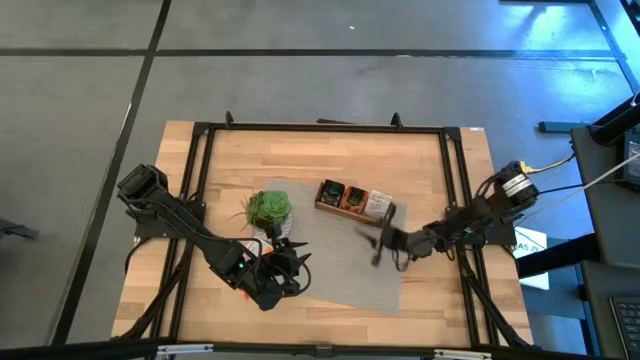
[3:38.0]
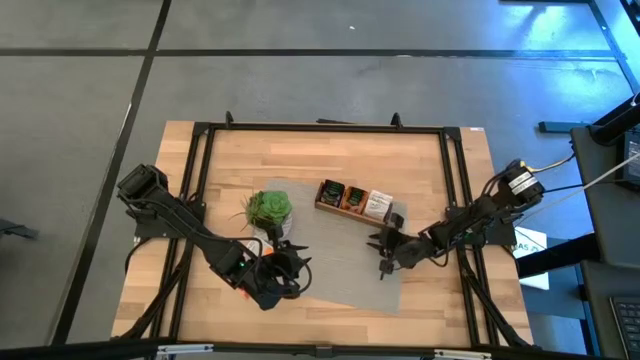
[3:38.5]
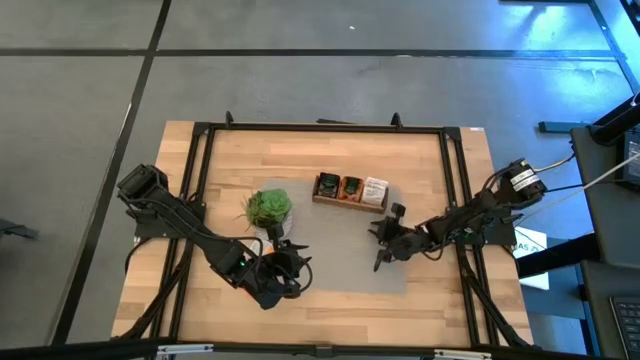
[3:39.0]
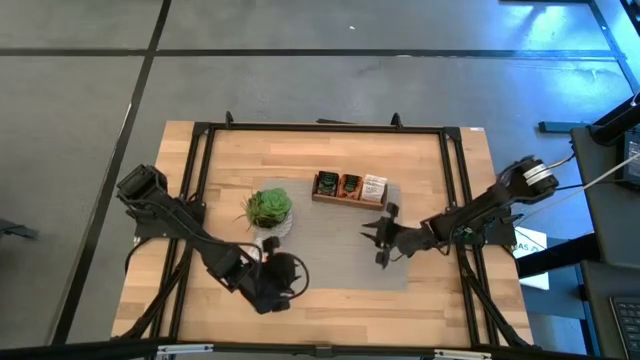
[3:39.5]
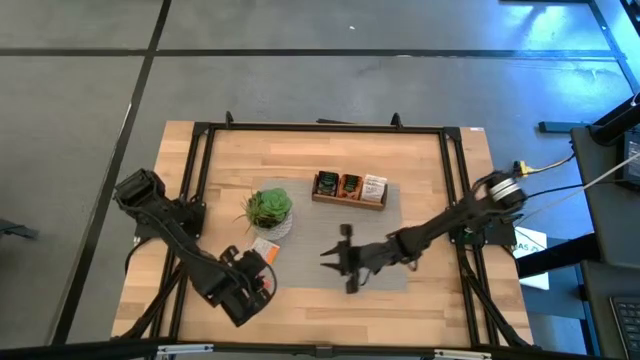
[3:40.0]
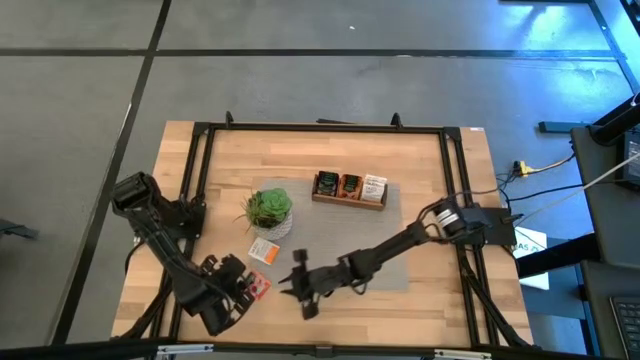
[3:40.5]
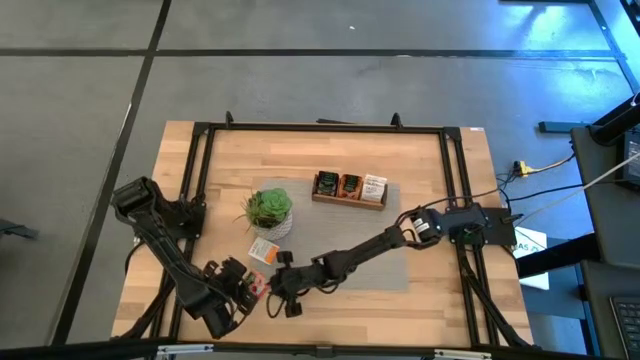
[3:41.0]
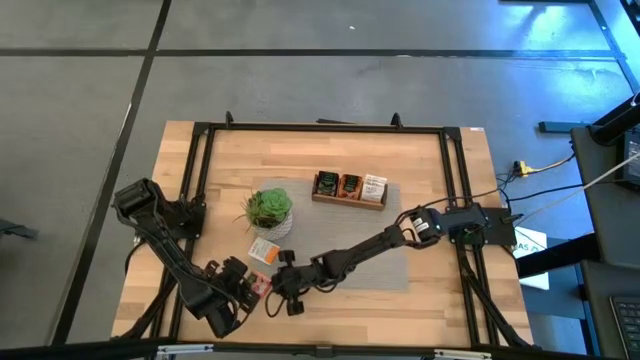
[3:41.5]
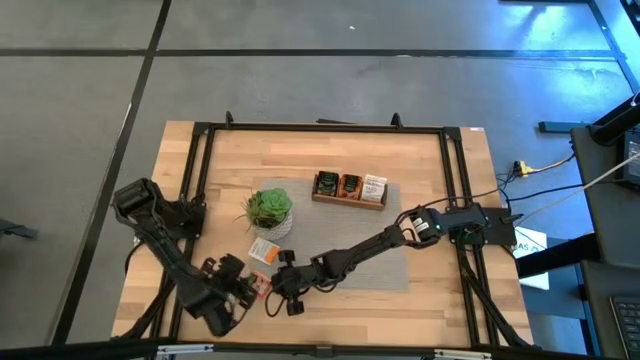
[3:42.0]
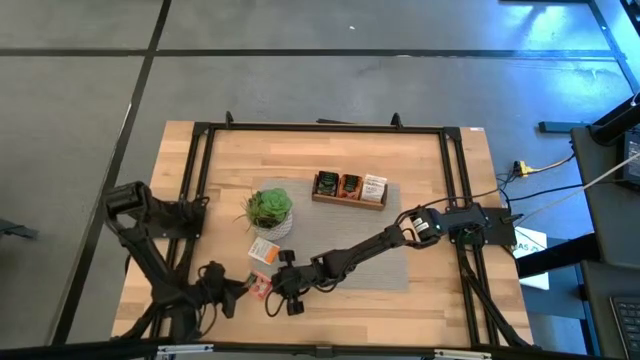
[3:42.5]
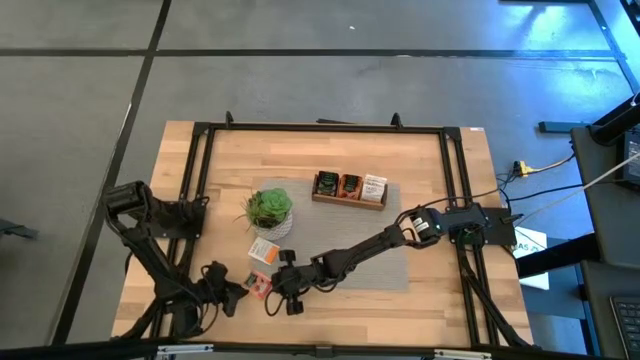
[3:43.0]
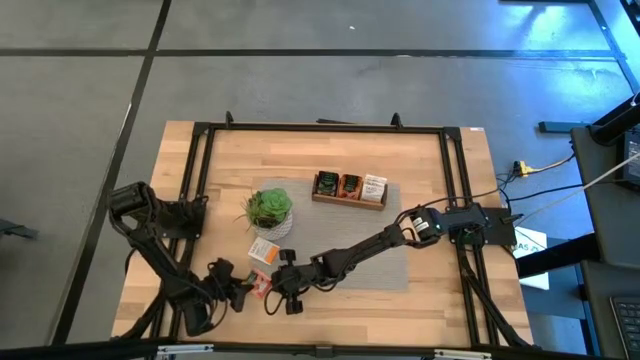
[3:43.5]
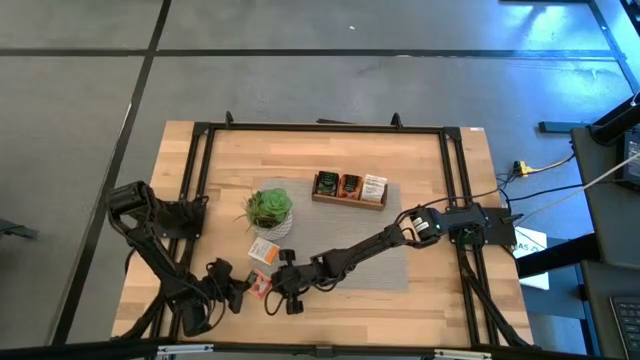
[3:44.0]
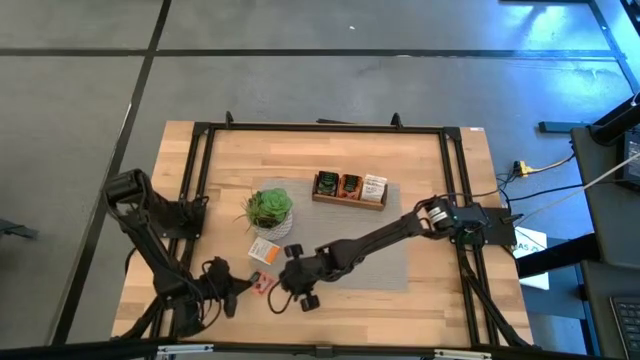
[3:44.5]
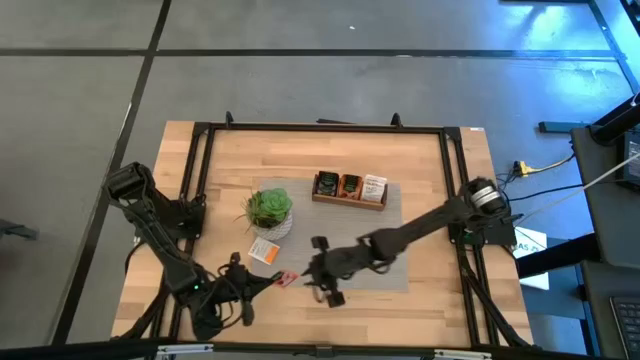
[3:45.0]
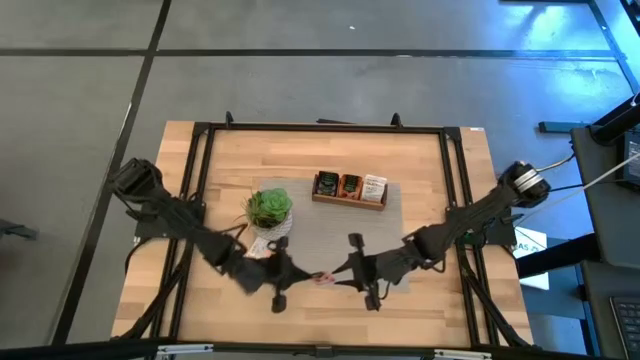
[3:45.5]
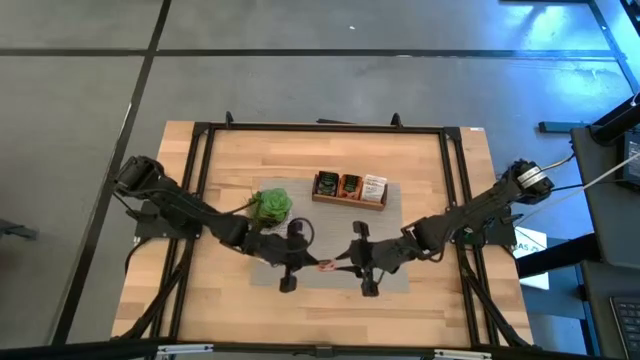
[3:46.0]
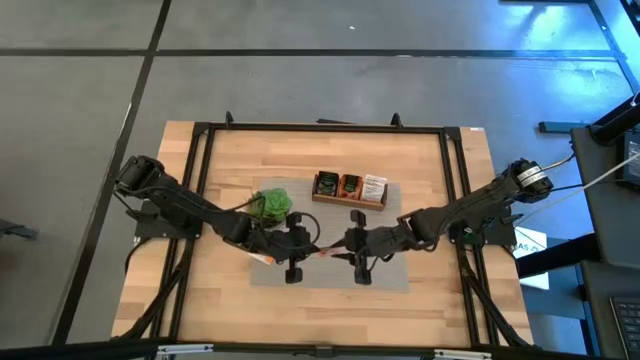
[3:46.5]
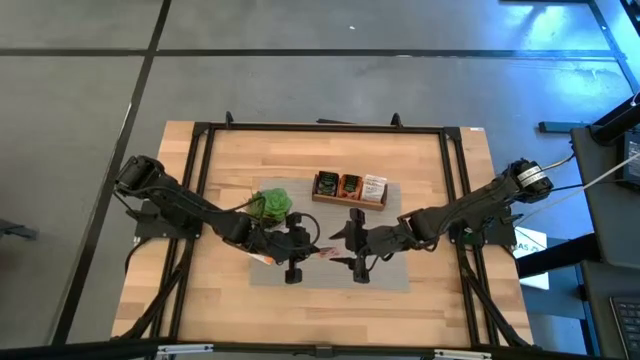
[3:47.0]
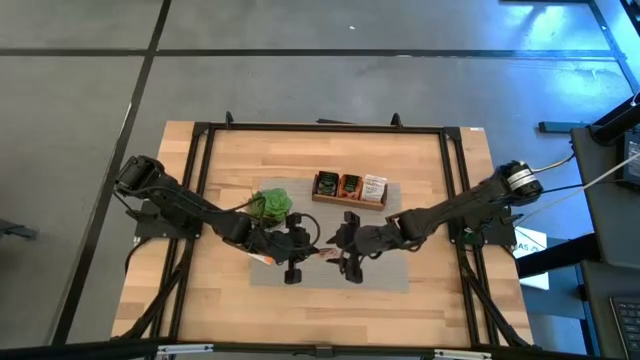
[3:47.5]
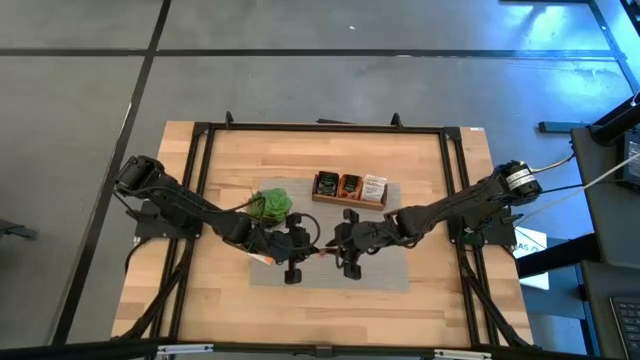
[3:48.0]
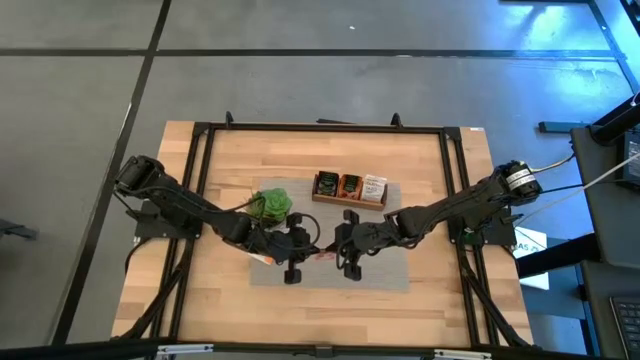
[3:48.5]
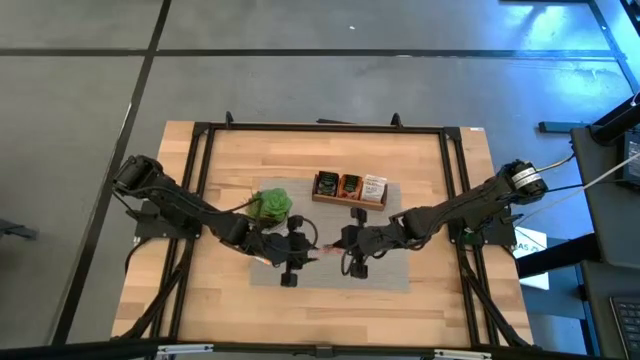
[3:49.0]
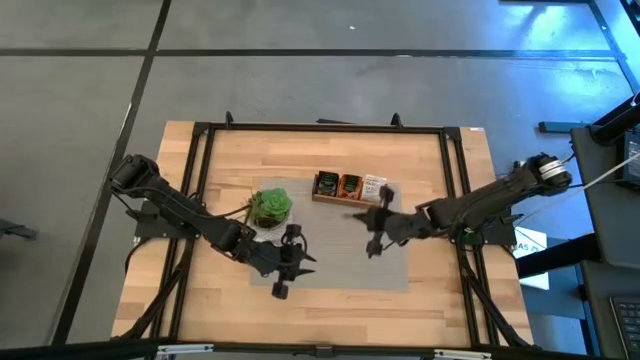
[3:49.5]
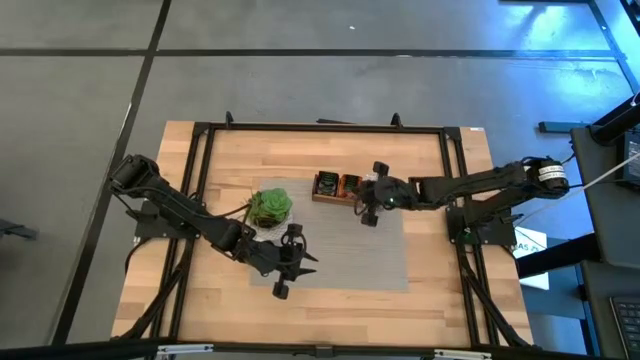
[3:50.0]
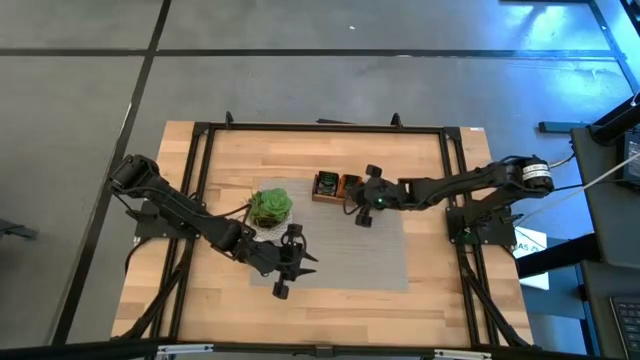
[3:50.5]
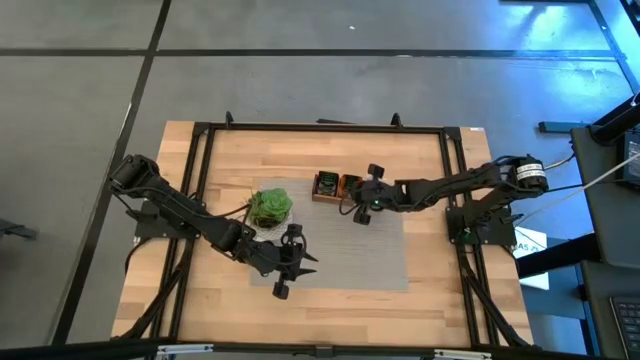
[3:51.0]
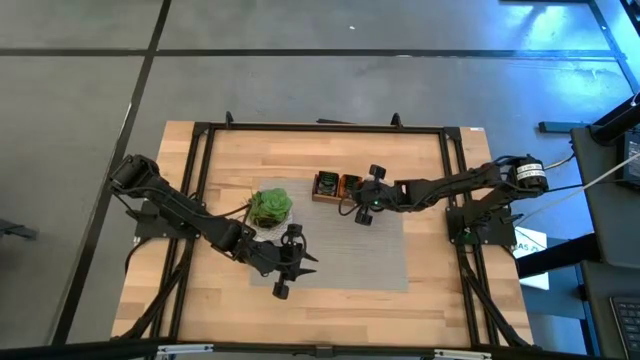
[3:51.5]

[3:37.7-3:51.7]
Task: Pick & Place Tea
Put the orange tea bag into the middle section of the wooden organizer

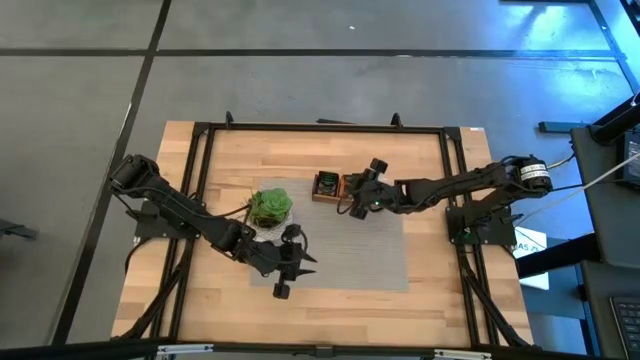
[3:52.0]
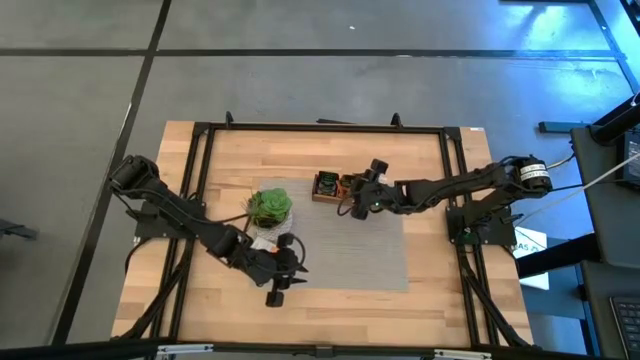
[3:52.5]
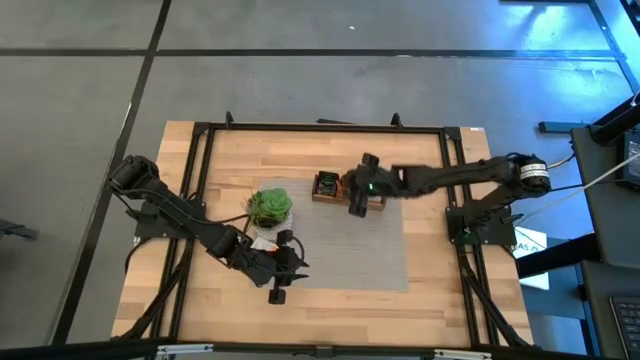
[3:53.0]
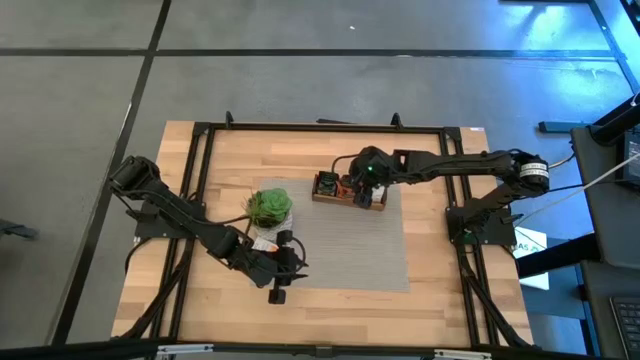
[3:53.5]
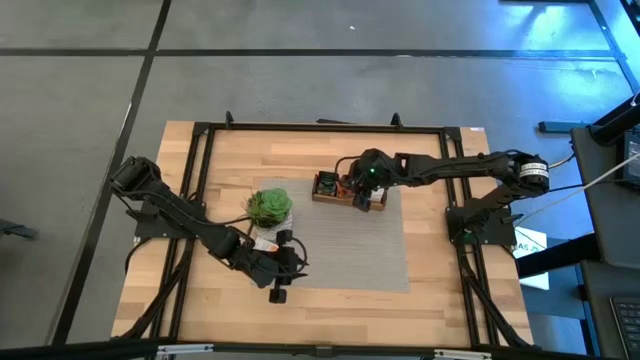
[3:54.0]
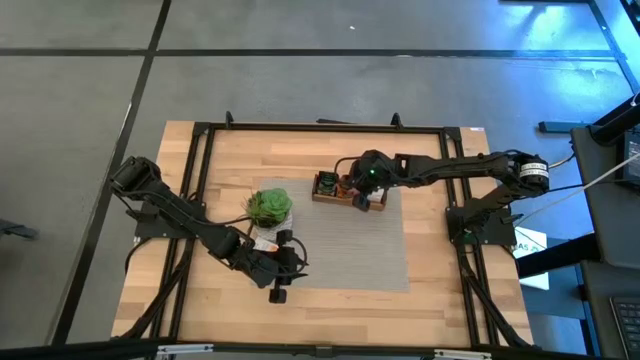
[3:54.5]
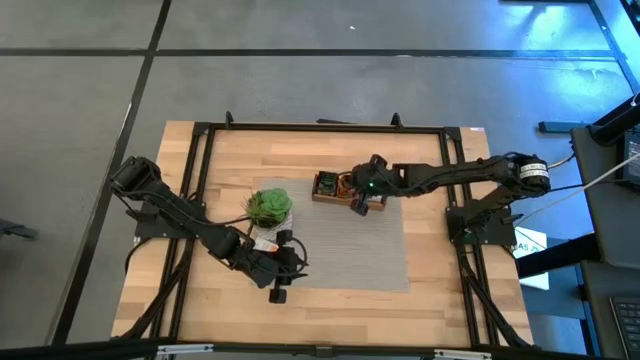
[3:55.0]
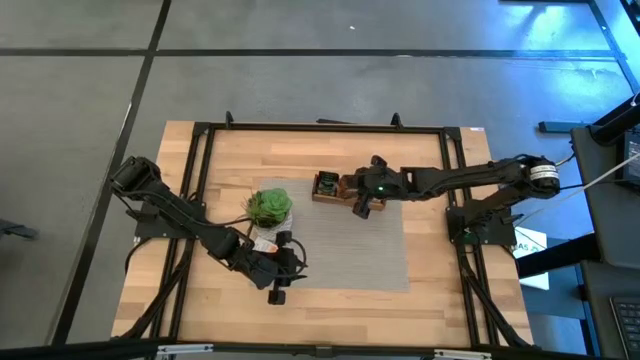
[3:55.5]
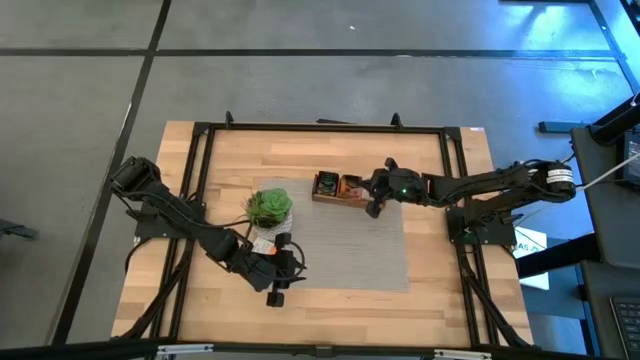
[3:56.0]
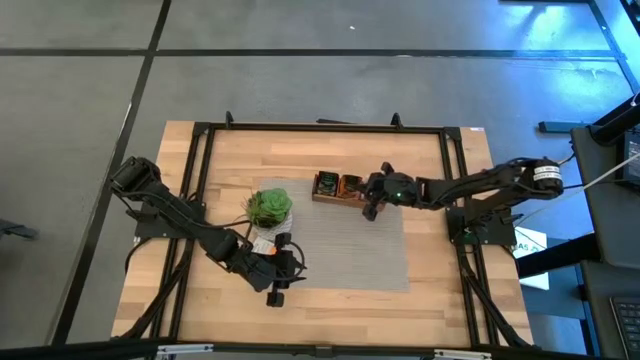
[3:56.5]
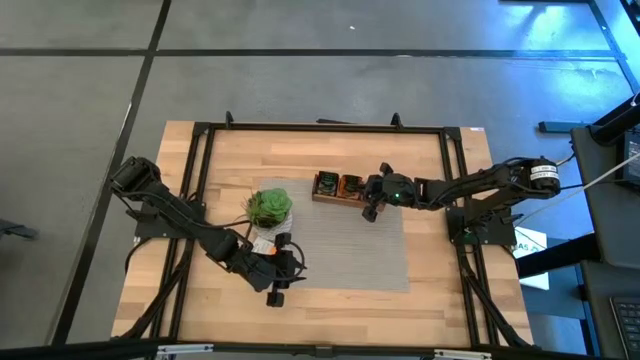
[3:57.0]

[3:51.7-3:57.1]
Adjust the orange tea bag in the wooden organizer

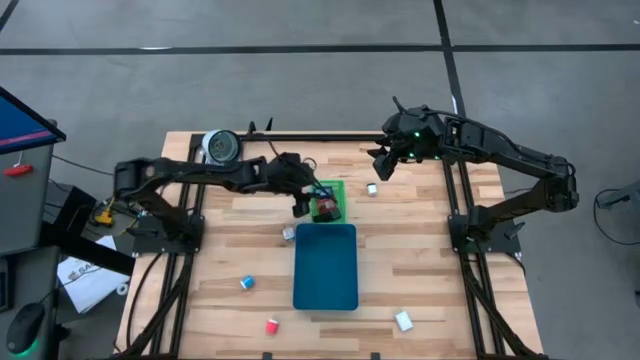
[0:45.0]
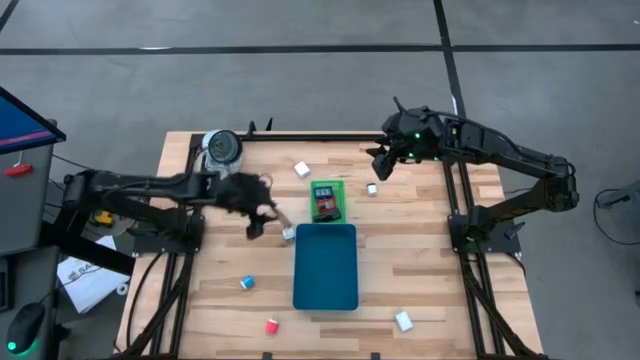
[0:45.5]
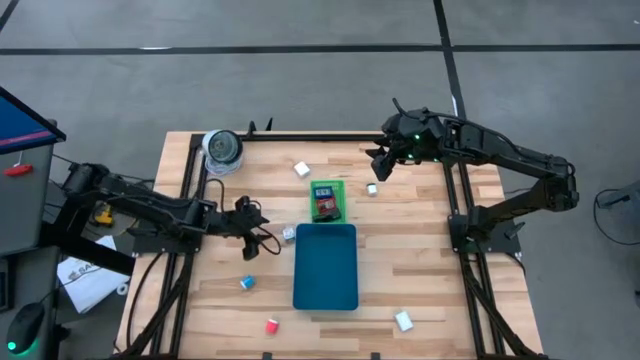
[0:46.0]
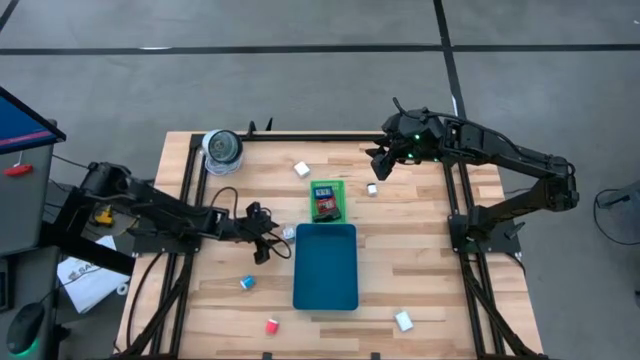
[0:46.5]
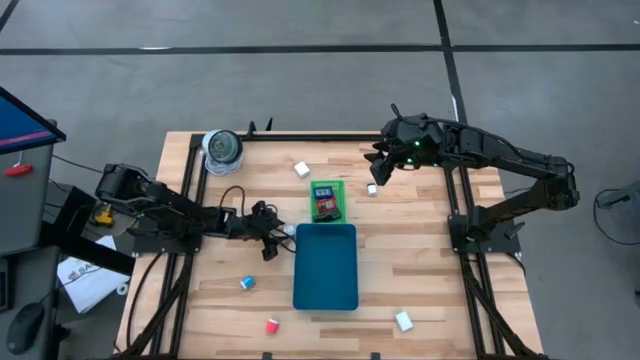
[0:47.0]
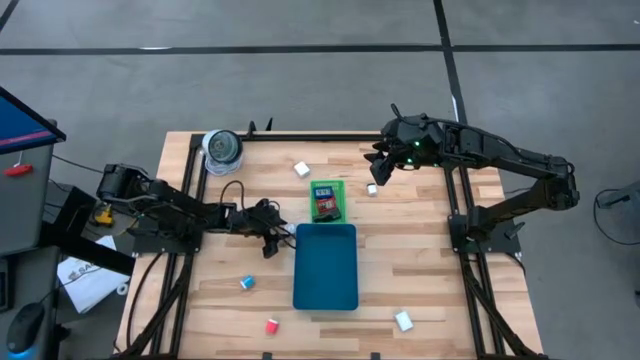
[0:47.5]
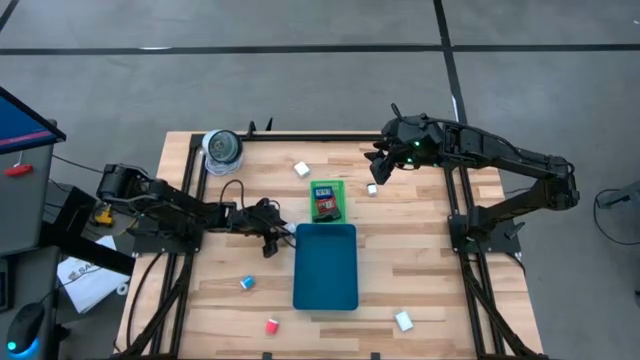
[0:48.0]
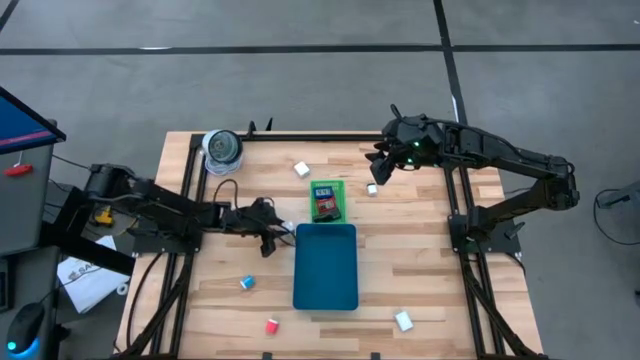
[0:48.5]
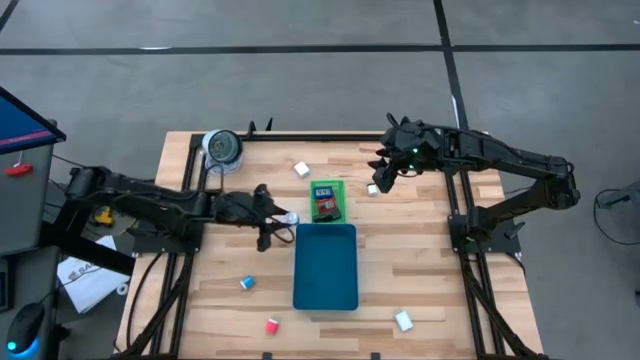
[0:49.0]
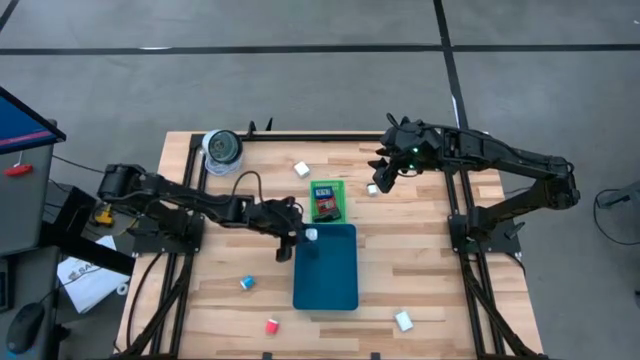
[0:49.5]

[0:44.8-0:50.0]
Task: Pick & Place Office items
Put the top blue charger adapter into the blue bin
